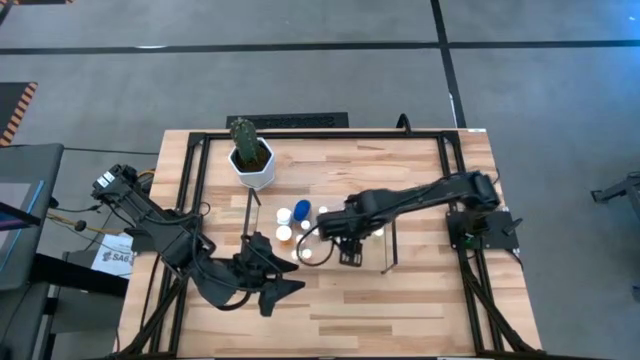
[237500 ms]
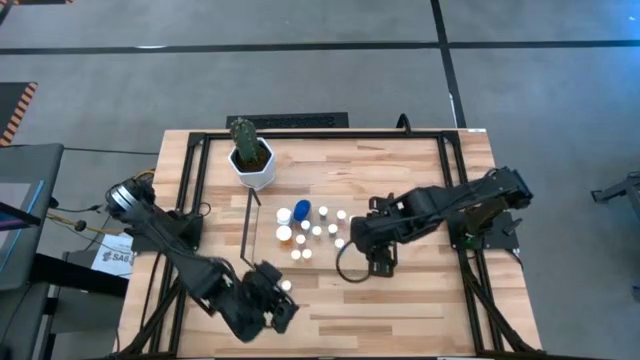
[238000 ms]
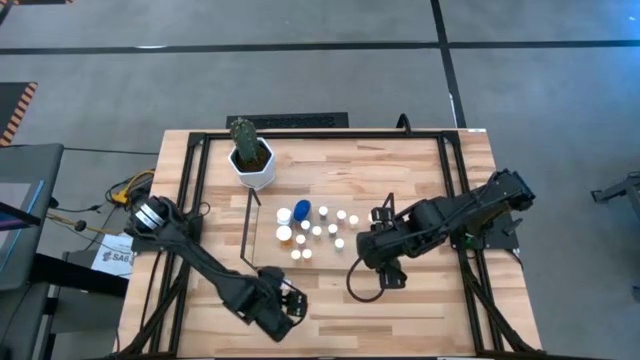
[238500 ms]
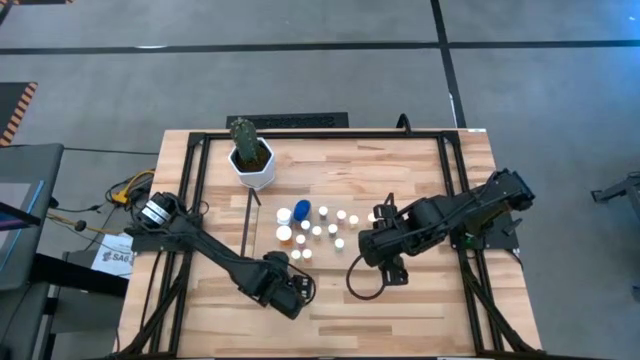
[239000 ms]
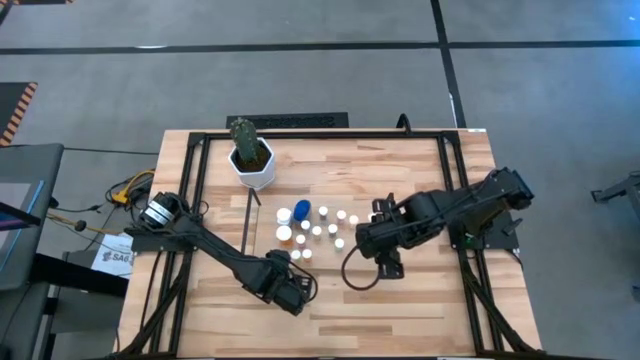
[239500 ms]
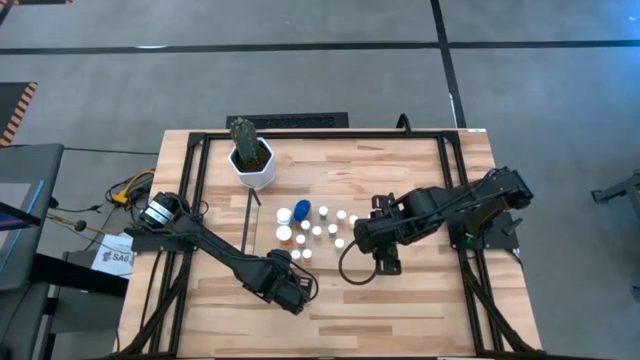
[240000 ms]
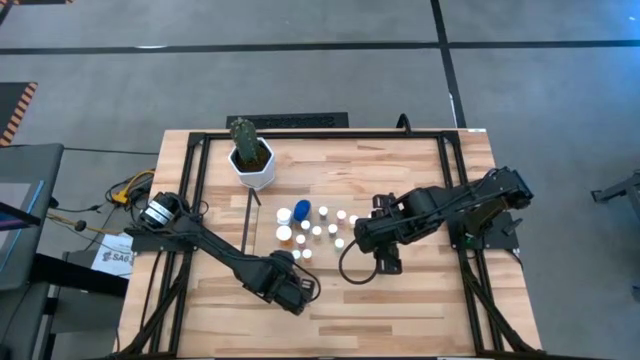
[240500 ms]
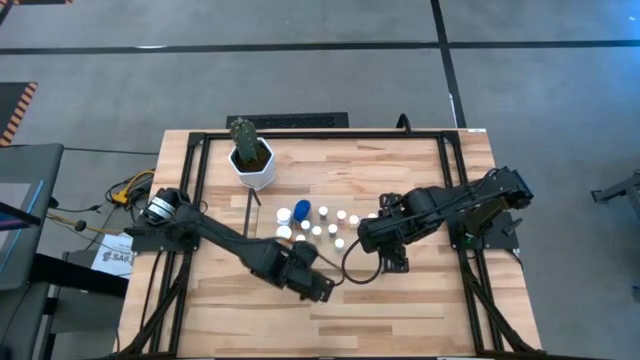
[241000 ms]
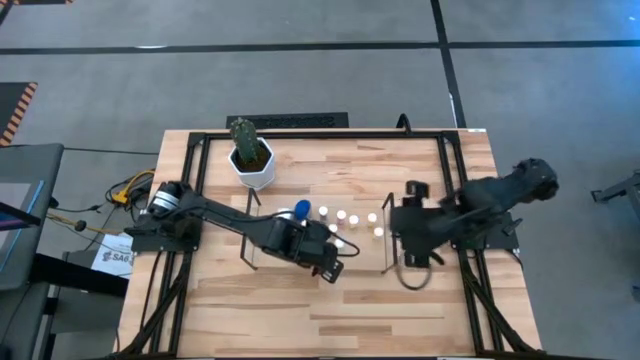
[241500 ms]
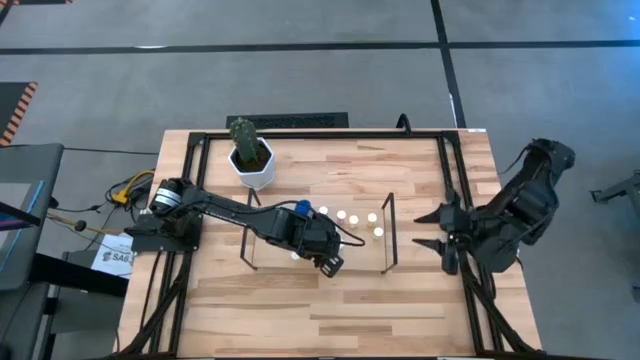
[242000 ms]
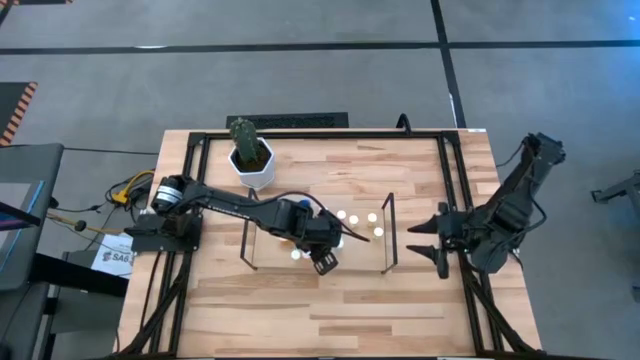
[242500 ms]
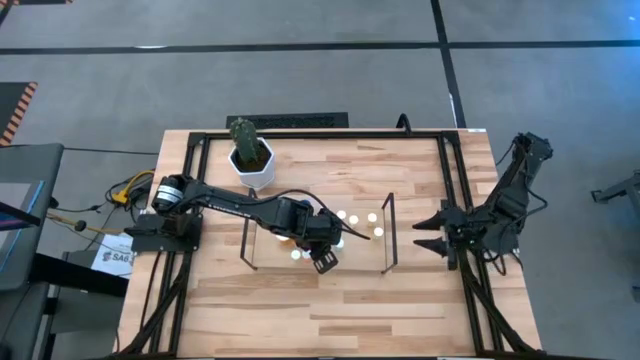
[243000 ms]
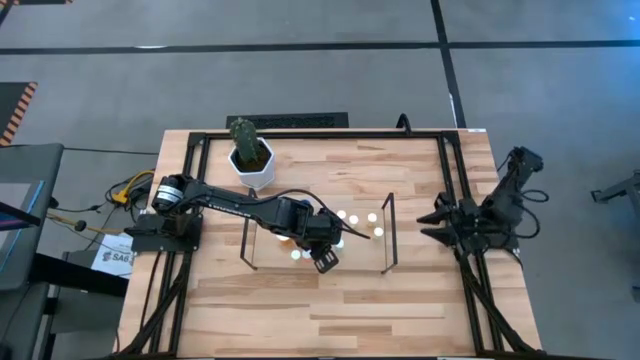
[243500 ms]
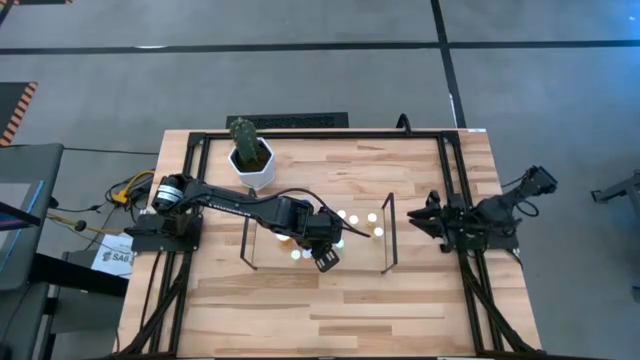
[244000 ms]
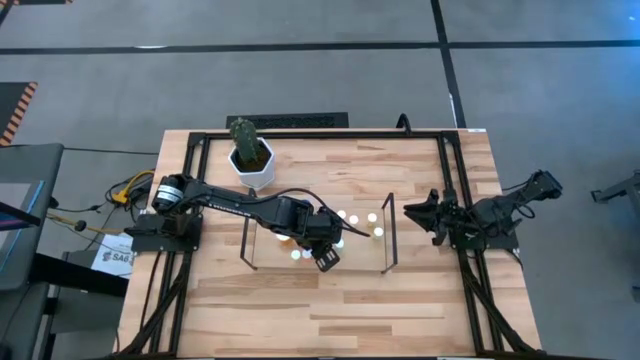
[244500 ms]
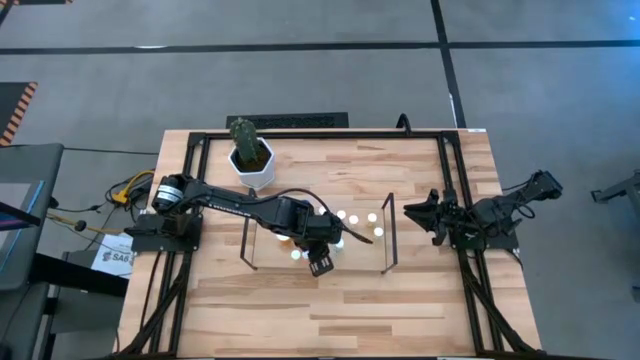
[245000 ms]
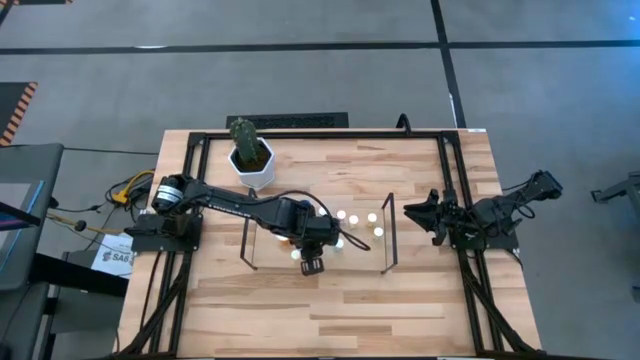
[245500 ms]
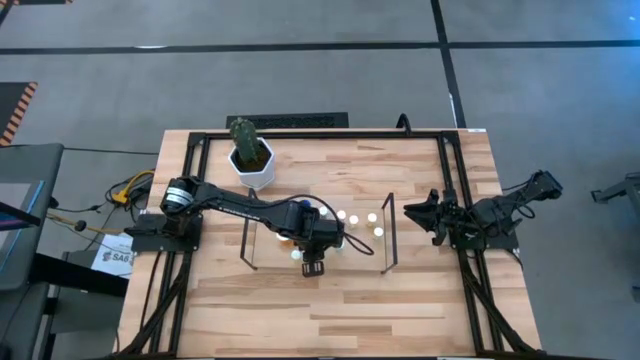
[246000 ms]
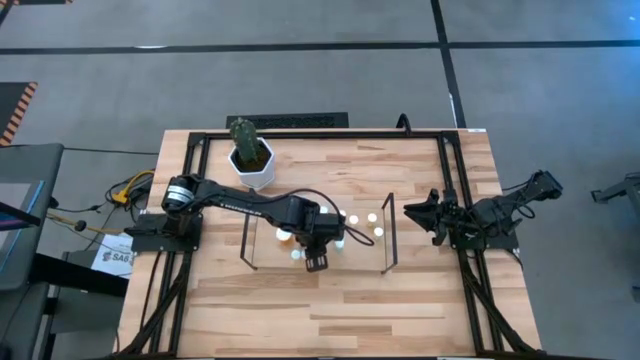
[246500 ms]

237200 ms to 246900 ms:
Task: Pick and place medicine bottles onto shelf by color
Put the blue pill bottle on the shelf

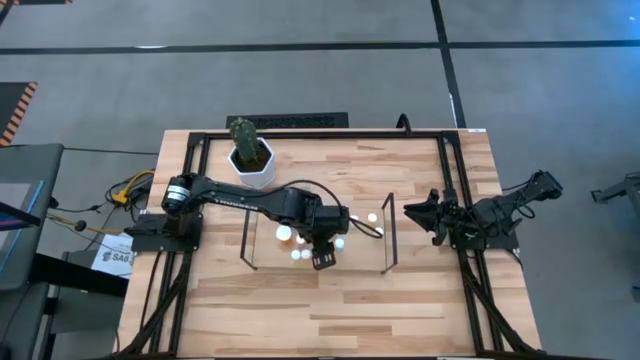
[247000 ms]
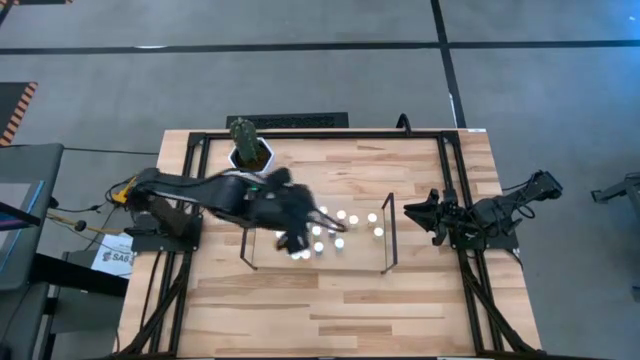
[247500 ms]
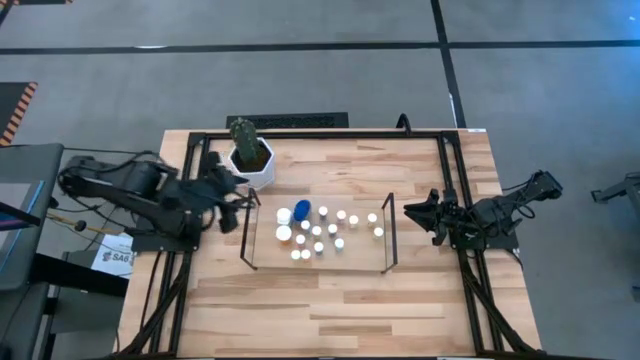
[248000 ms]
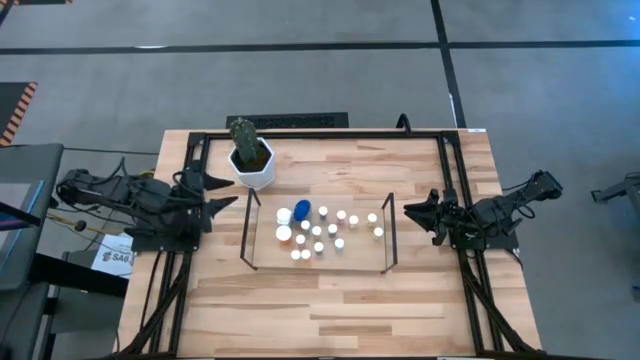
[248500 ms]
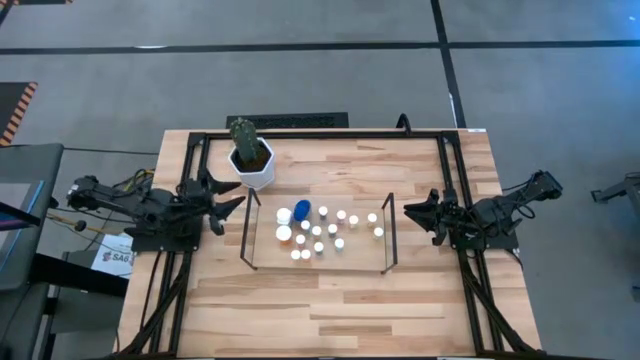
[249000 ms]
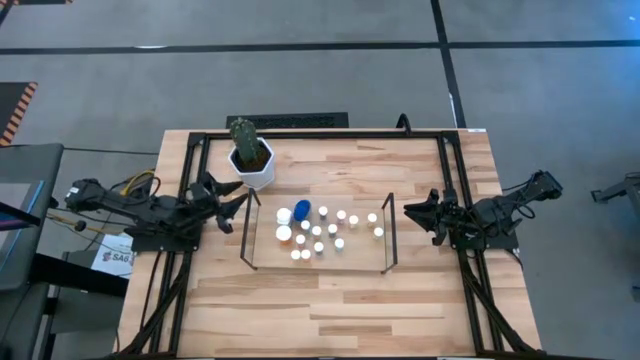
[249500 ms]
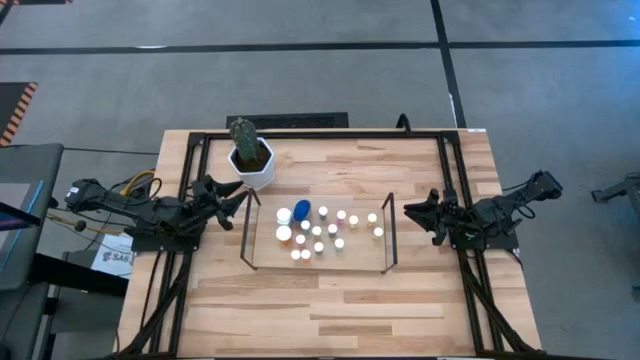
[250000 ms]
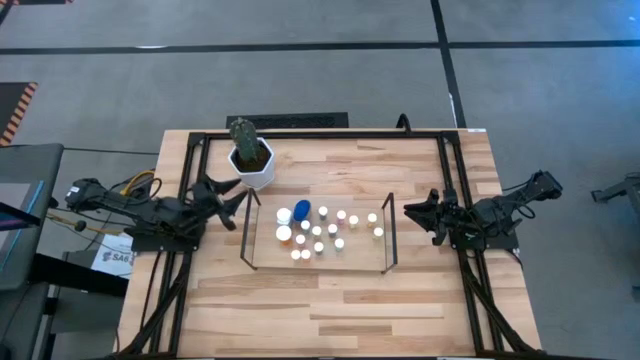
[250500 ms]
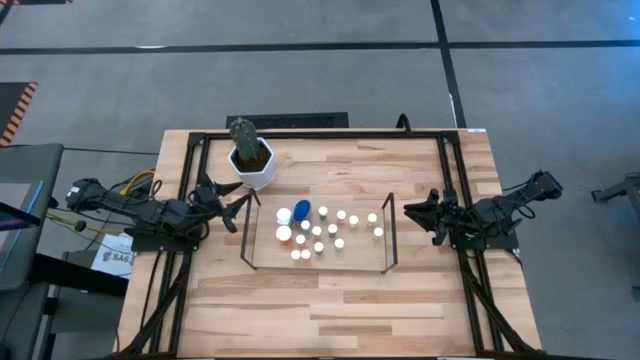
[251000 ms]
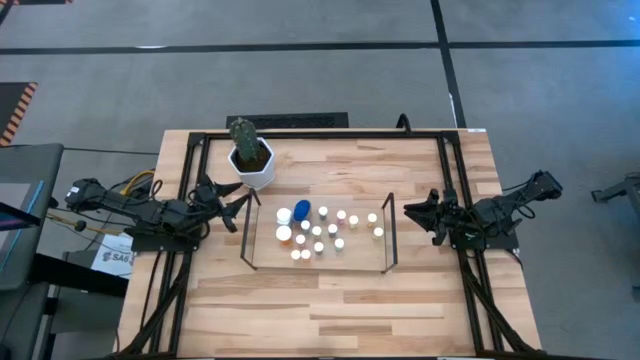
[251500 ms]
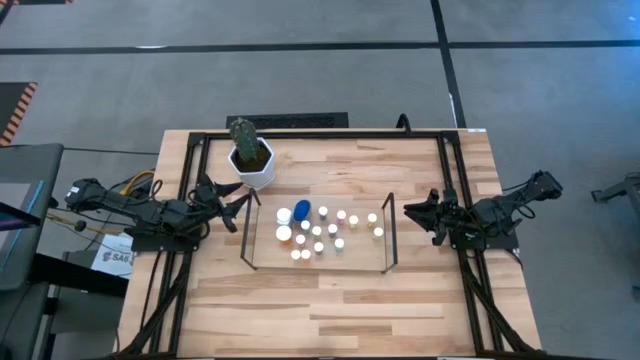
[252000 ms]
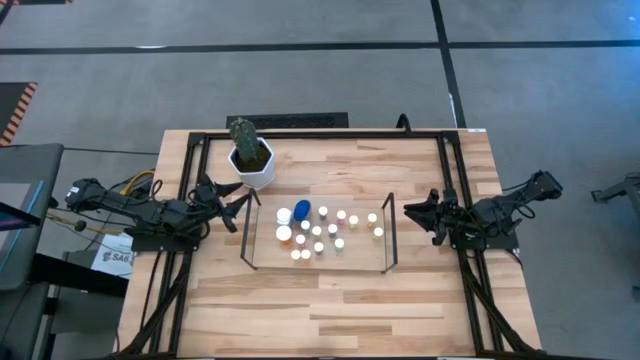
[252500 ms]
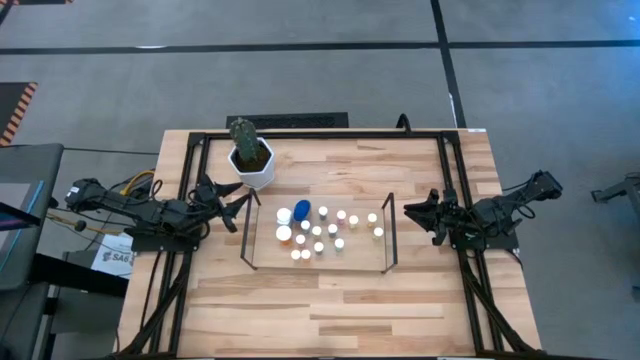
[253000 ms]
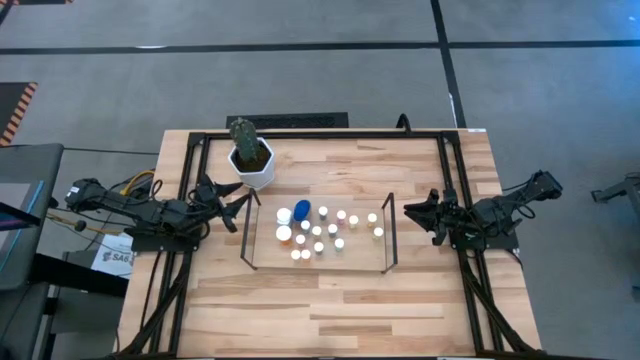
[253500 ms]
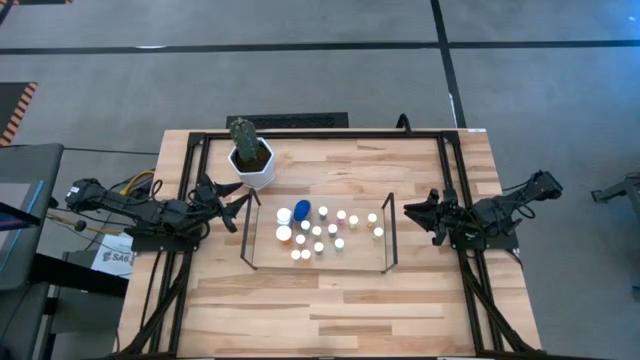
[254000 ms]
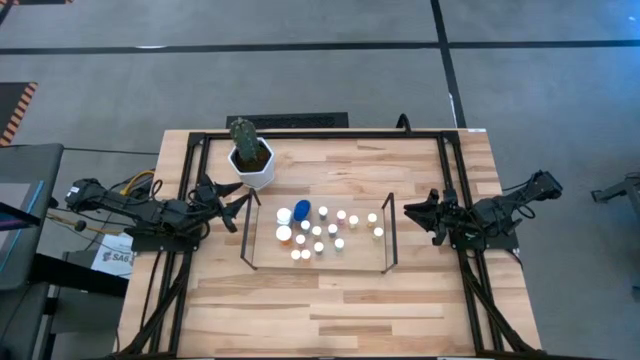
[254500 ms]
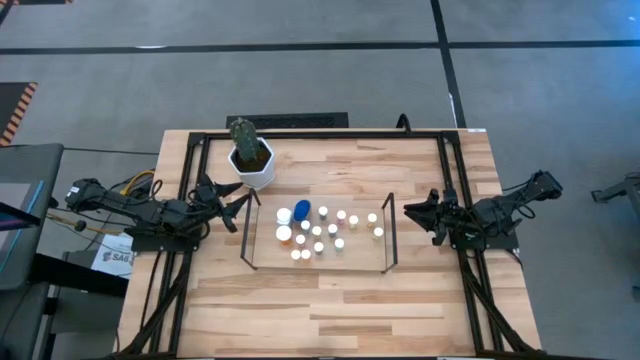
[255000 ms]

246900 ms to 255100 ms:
Return to Home Position

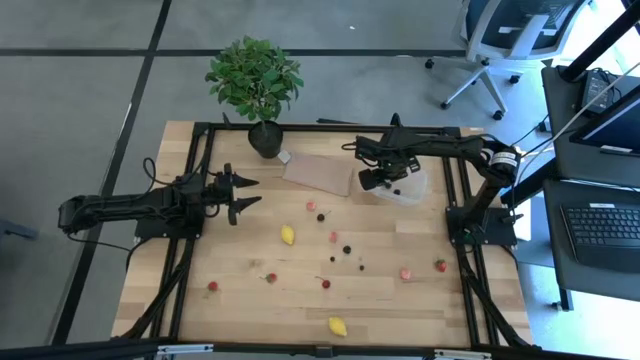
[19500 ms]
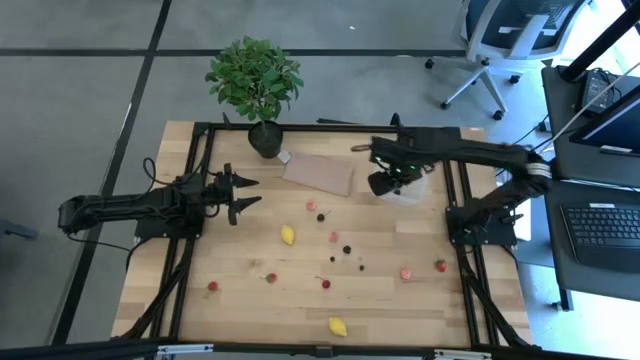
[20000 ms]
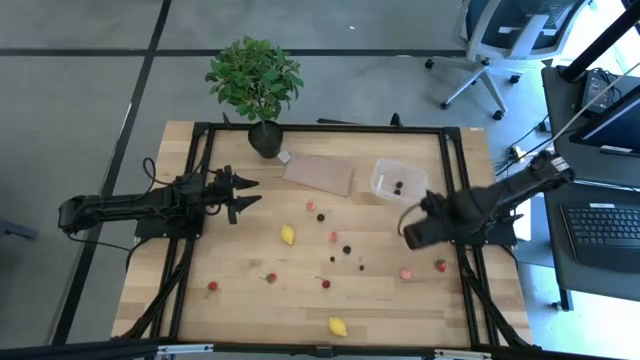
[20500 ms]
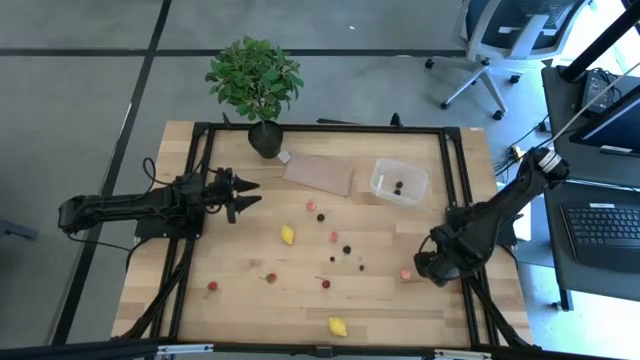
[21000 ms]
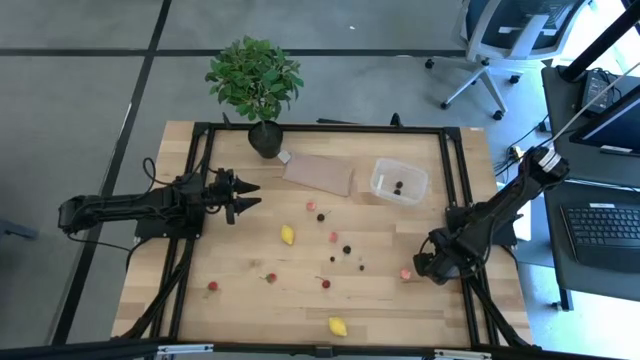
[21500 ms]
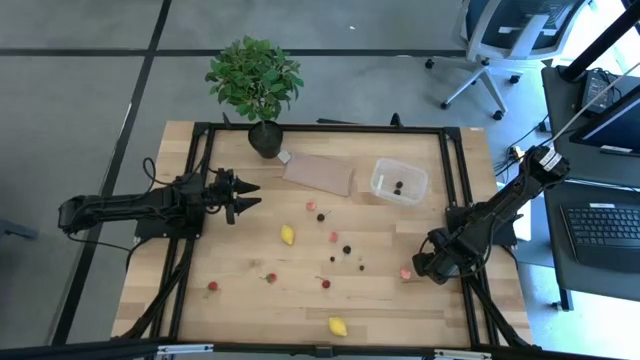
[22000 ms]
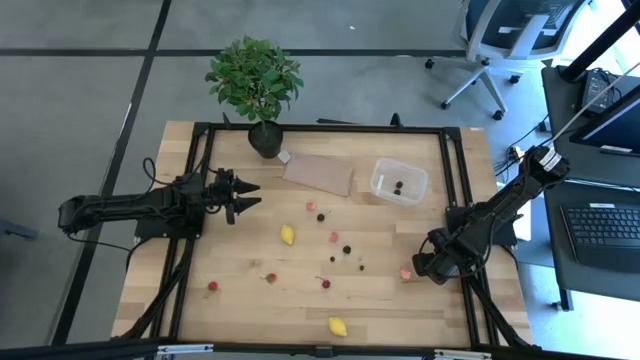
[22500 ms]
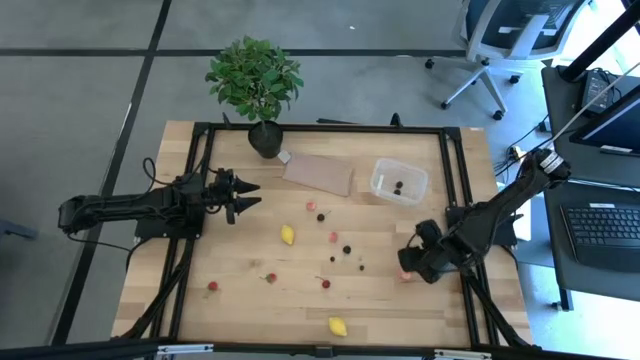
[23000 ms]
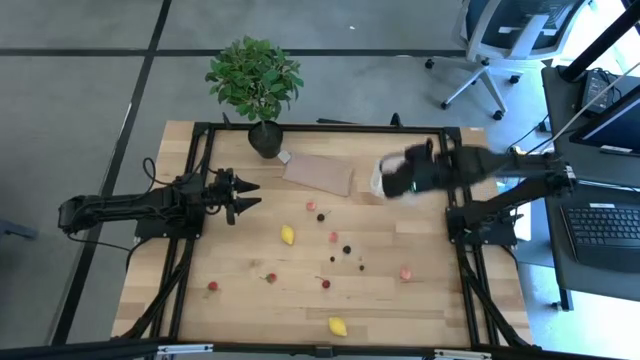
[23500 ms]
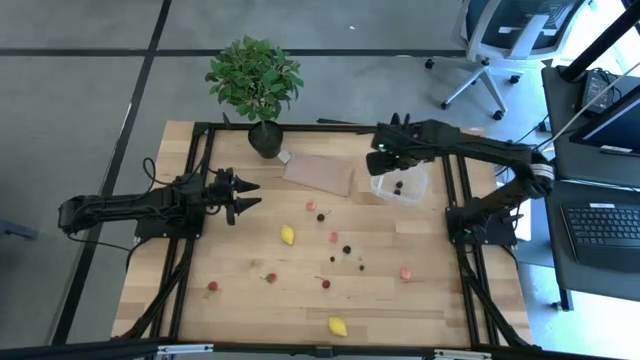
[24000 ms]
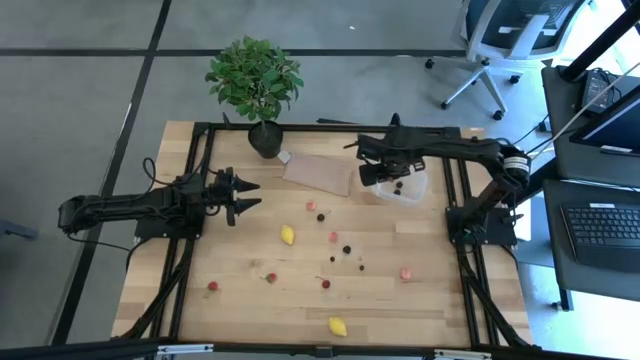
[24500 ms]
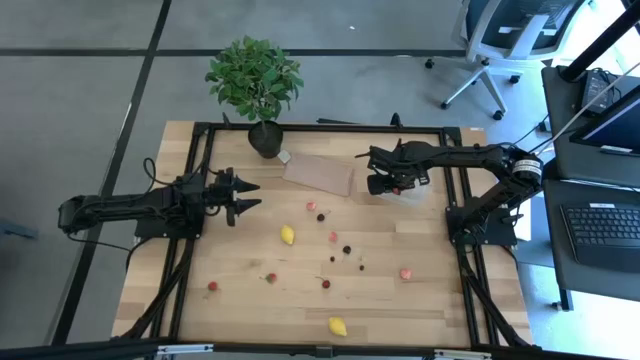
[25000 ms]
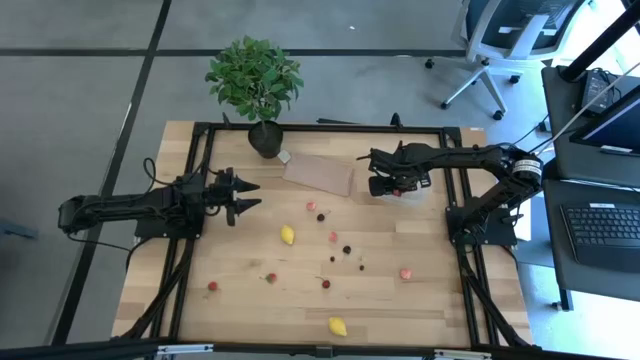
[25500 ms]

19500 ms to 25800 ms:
Task: Pick and placing Produce into tupperware
Put the top right red strawberry into the transparent container
